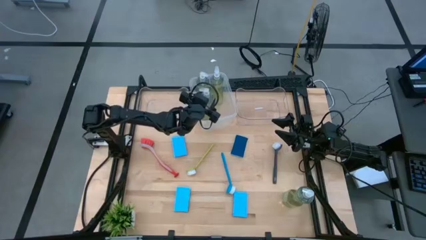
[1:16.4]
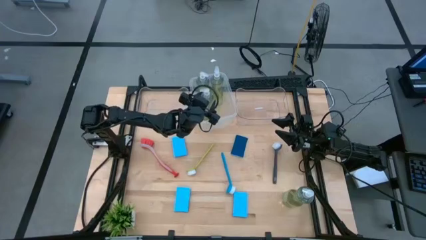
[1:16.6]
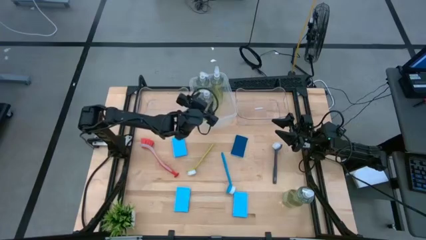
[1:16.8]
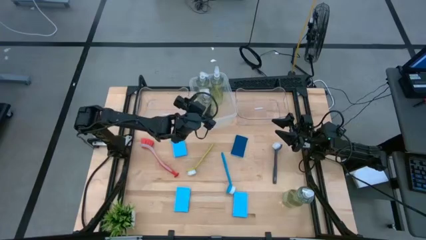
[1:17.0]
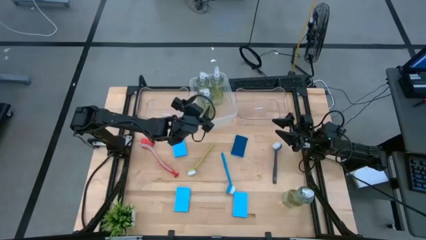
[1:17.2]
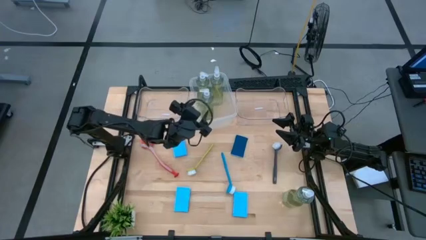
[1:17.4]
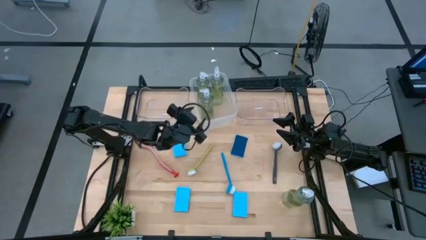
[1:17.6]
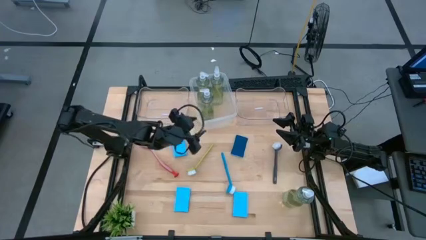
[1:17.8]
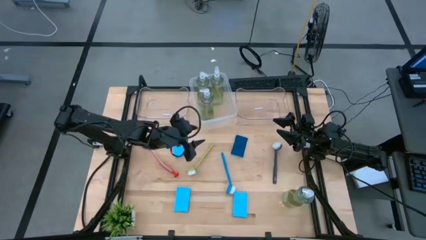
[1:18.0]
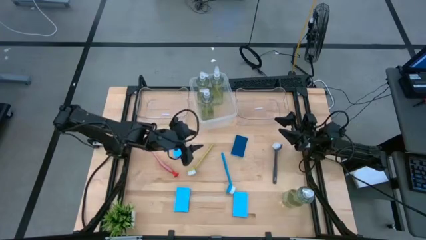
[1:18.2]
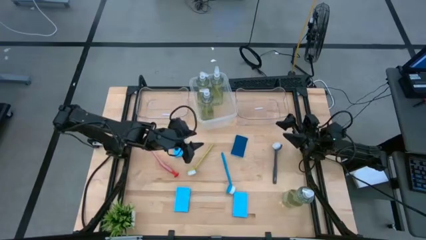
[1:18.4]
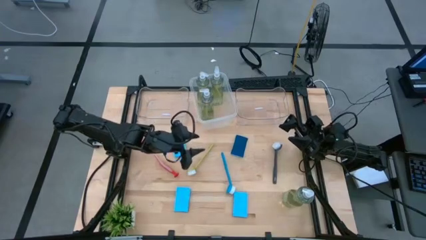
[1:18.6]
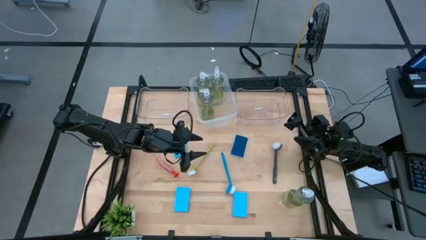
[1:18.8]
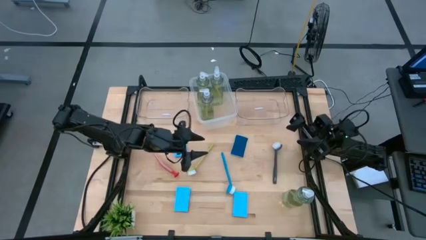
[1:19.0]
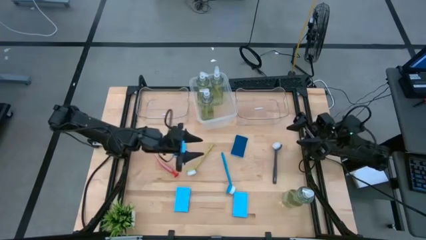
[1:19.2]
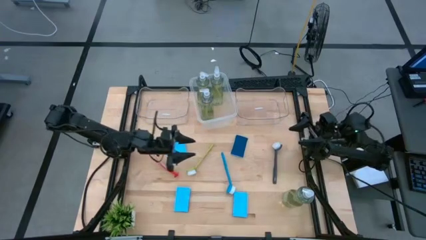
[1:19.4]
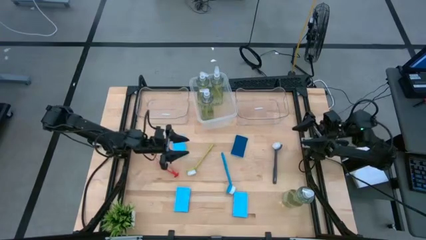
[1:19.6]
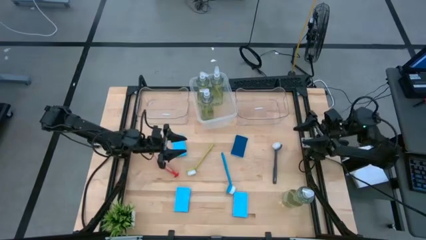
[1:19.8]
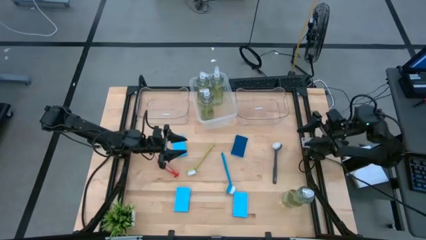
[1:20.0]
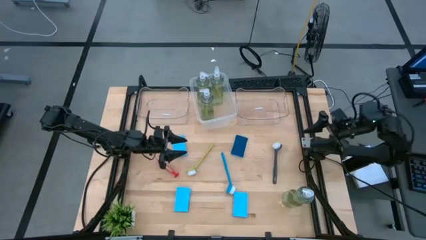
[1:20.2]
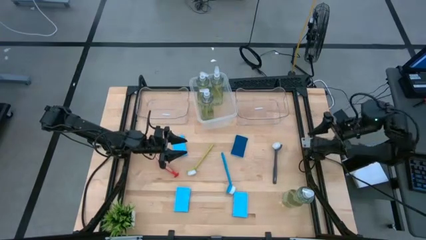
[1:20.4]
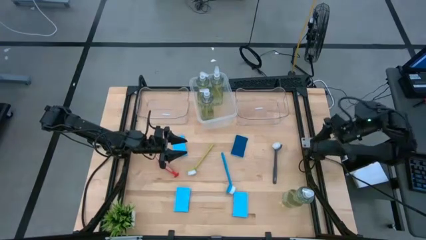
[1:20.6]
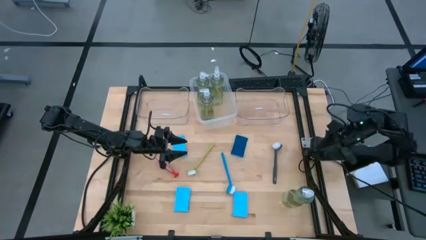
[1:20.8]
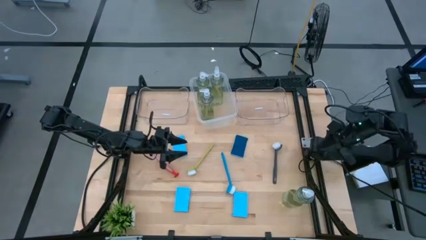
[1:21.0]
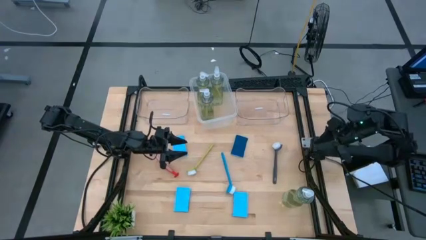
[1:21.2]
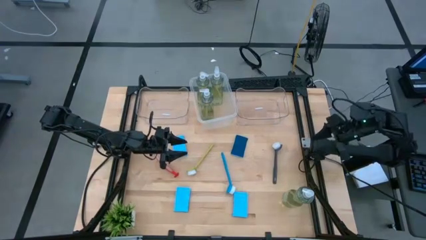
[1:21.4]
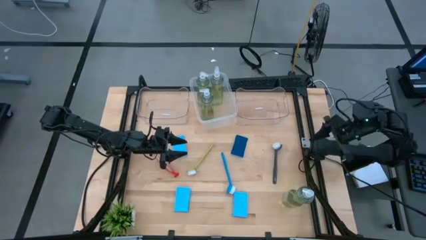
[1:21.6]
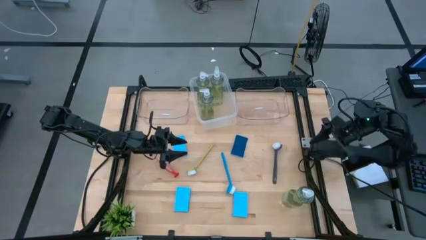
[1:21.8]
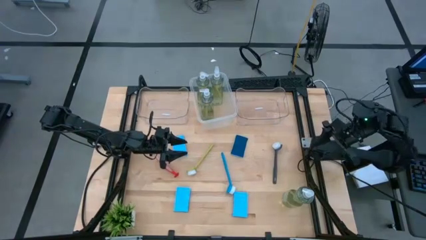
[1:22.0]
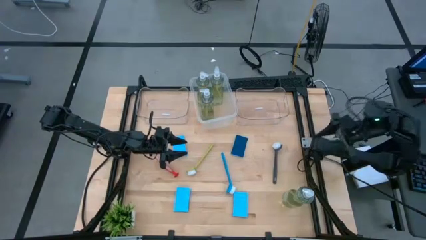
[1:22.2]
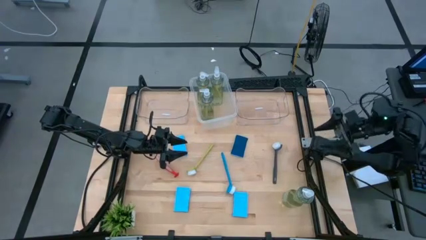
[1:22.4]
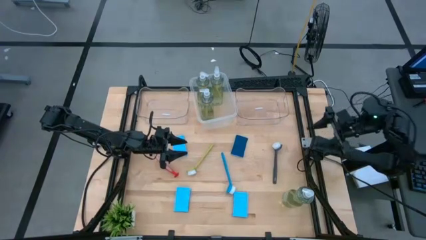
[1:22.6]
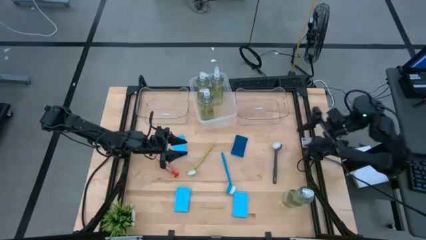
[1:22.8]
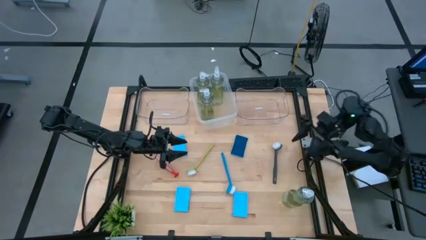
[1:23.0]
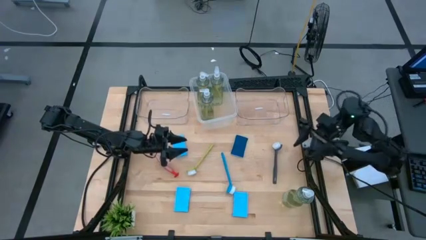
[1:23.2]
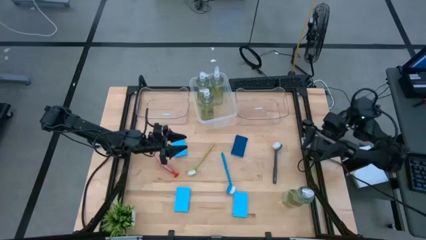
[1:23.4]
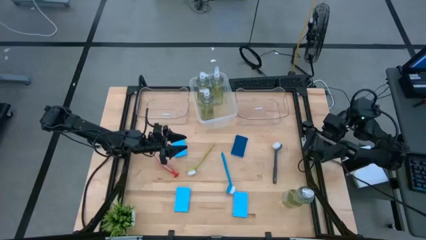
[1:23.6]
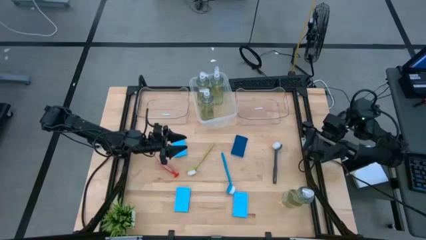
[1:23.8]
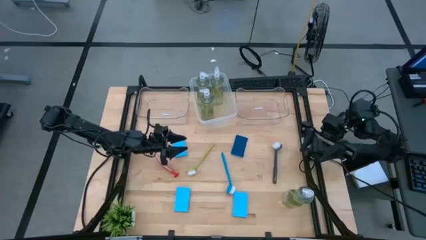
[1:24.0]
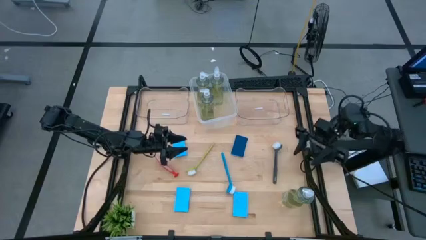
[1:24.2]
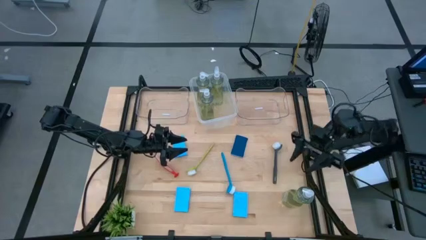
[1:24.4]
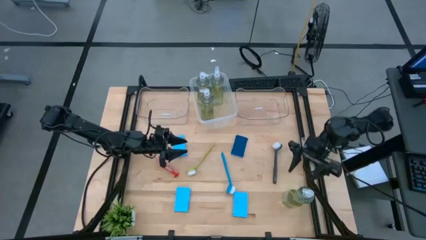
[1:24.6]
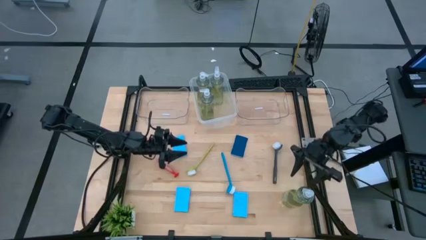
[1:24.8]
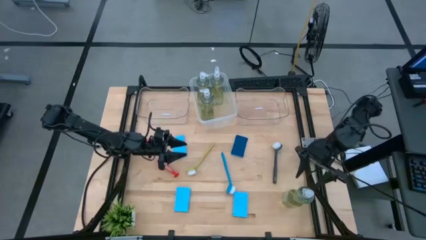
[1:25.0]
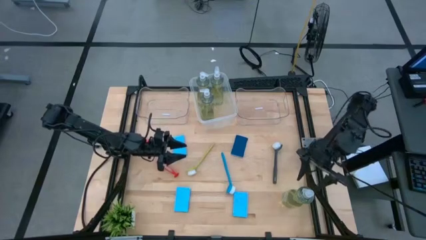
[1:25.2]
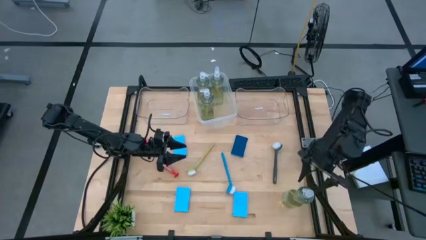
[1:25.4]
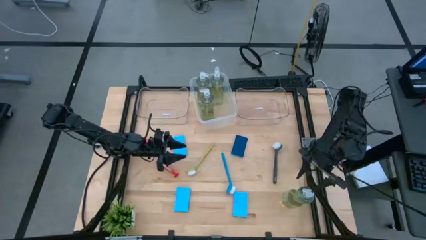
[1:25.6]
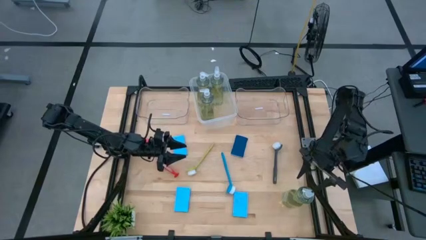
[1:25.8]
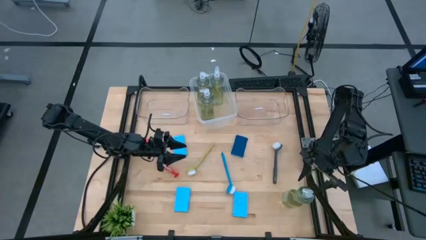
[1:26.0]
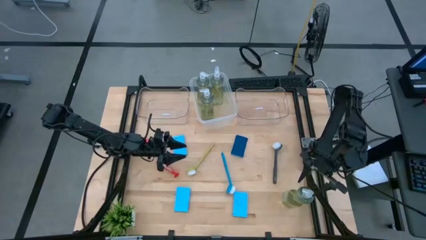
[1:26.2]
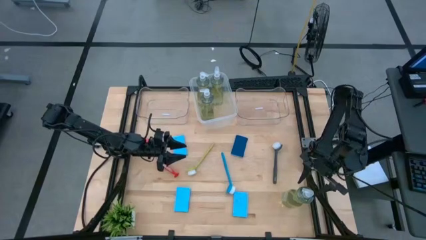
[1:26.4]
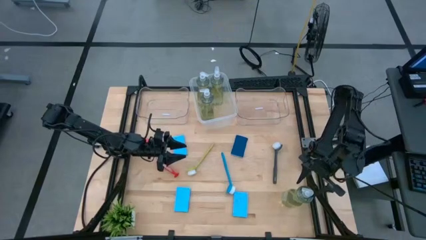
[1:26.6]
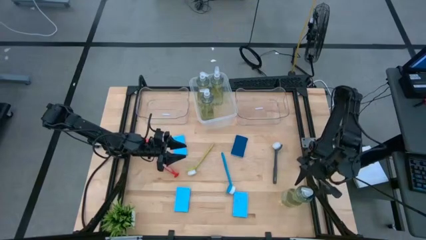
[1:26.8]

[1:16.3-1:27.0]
Task: Pick & Place Kitchen Sink Supplies
Put the green soap dispenser into the transparent white bin

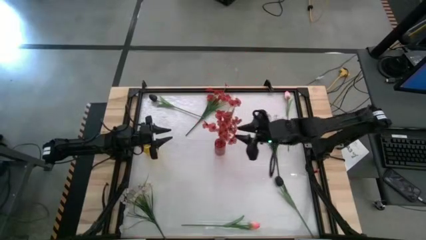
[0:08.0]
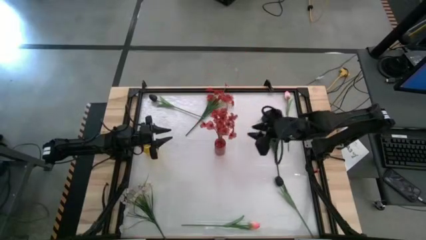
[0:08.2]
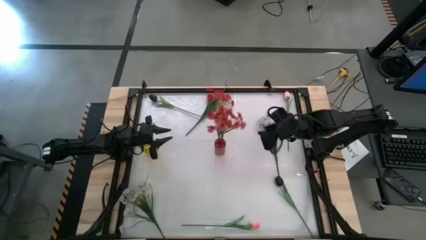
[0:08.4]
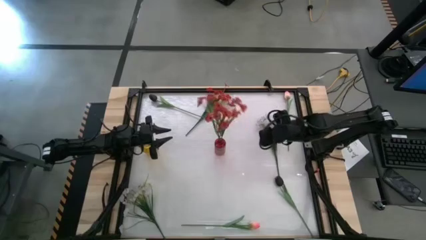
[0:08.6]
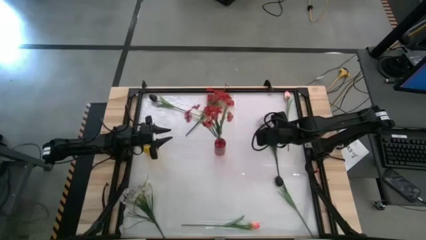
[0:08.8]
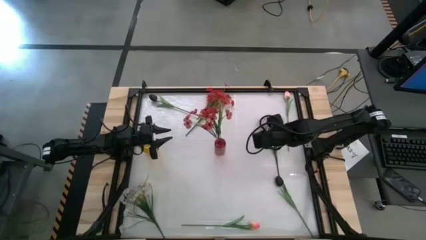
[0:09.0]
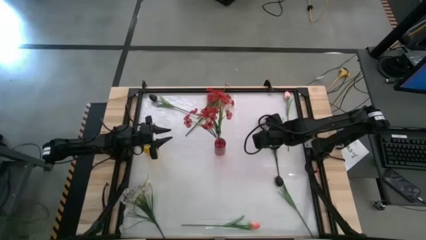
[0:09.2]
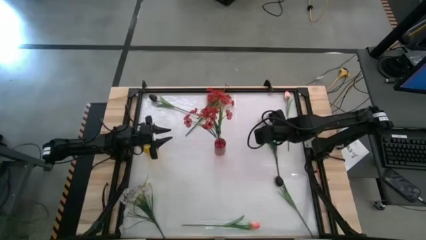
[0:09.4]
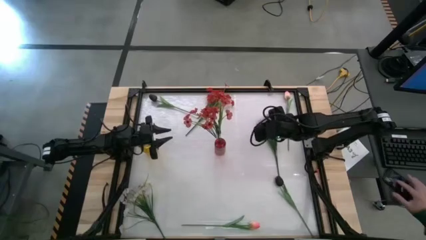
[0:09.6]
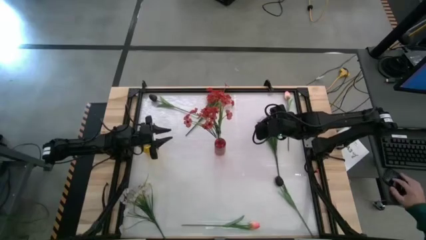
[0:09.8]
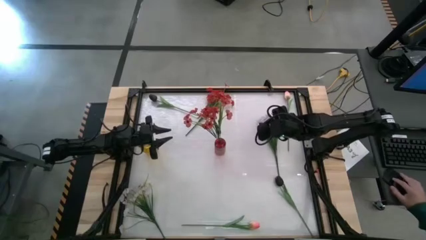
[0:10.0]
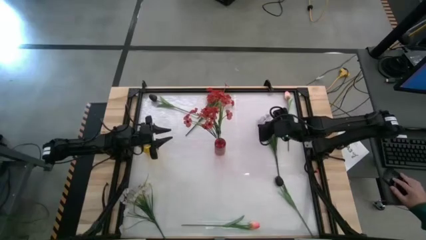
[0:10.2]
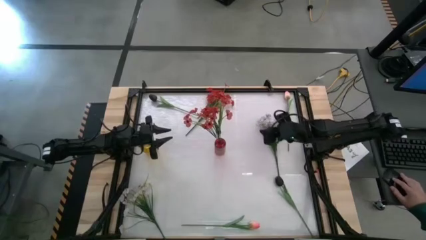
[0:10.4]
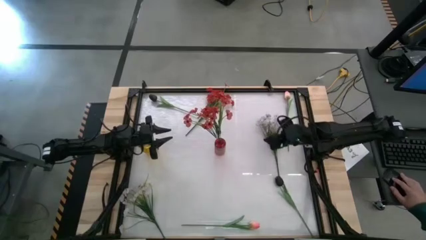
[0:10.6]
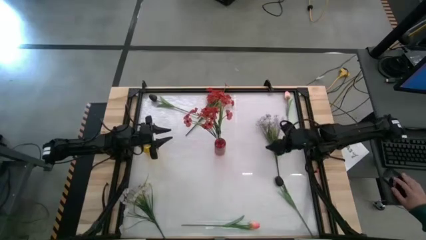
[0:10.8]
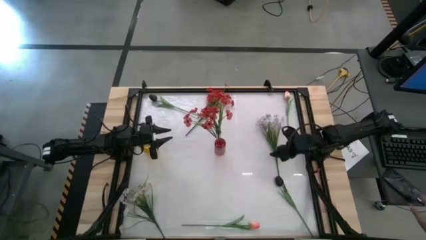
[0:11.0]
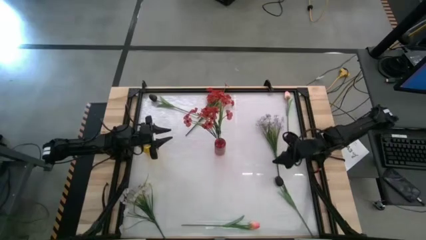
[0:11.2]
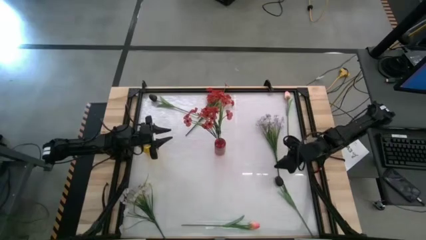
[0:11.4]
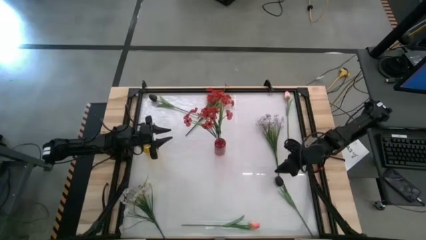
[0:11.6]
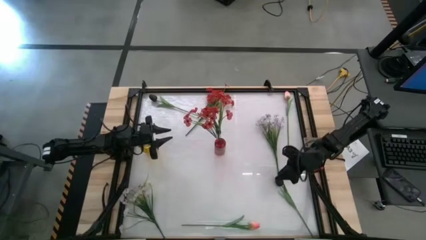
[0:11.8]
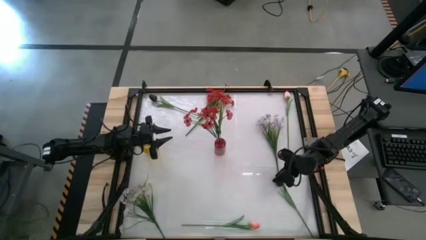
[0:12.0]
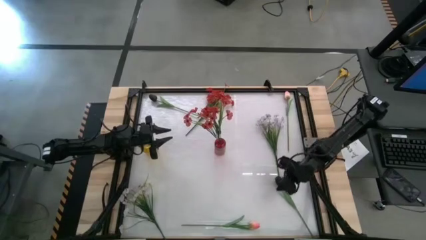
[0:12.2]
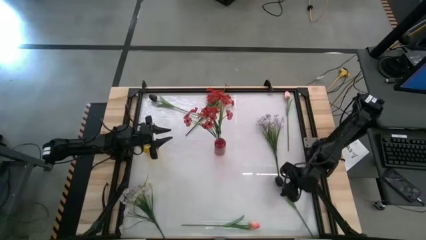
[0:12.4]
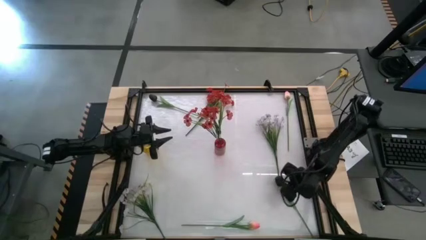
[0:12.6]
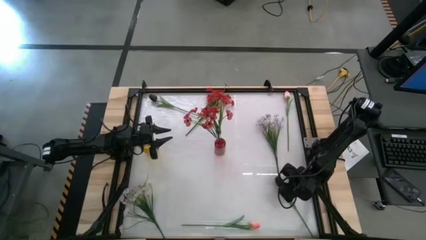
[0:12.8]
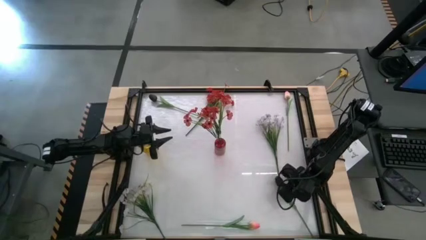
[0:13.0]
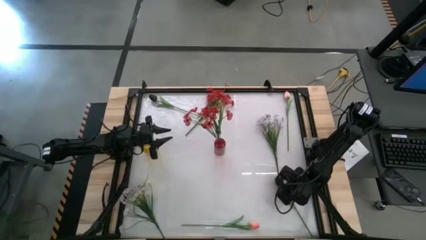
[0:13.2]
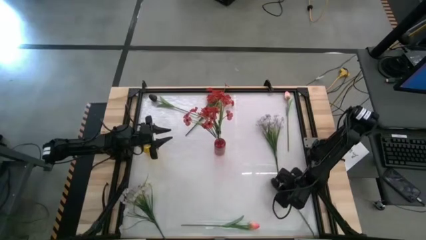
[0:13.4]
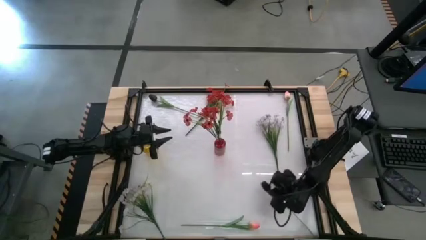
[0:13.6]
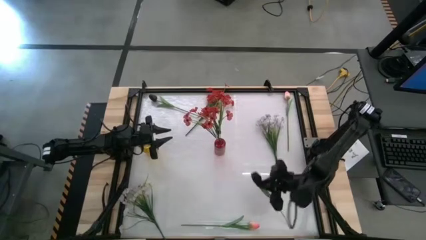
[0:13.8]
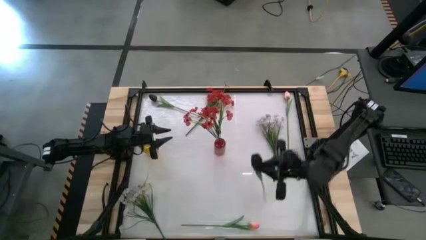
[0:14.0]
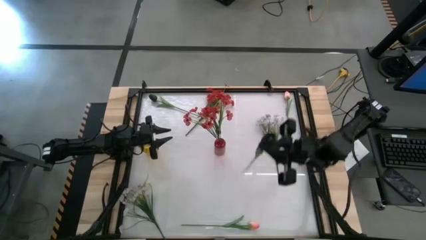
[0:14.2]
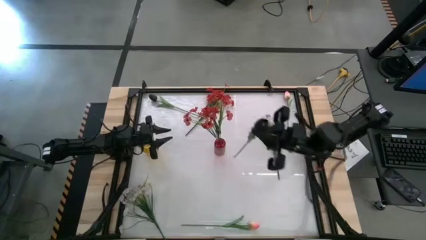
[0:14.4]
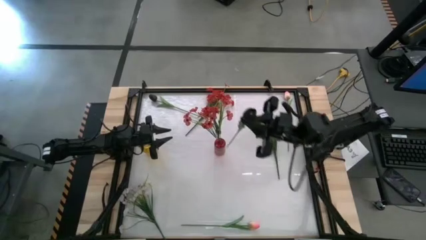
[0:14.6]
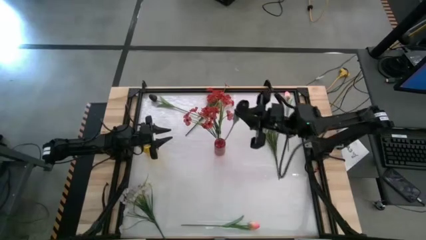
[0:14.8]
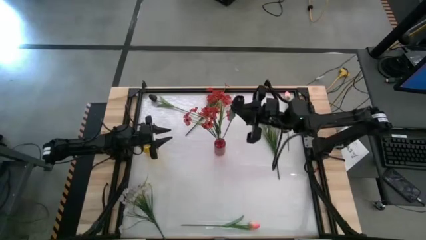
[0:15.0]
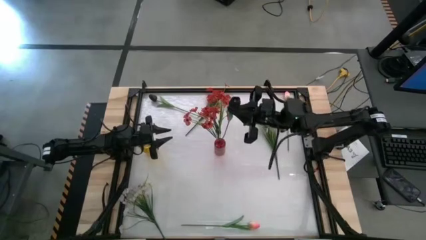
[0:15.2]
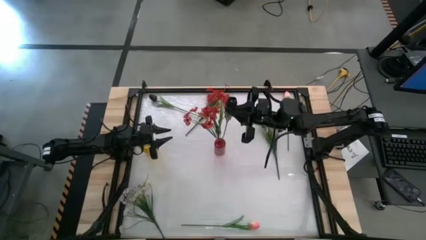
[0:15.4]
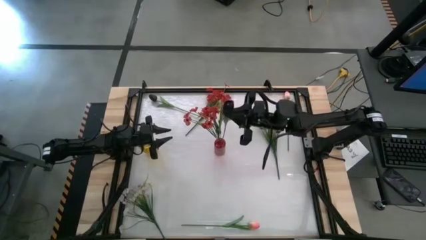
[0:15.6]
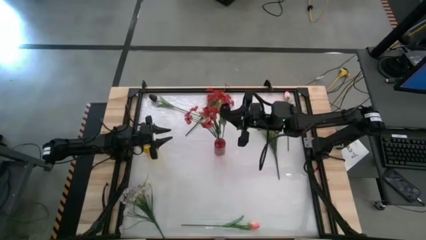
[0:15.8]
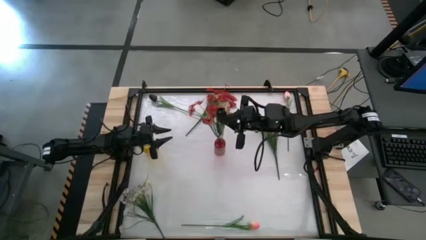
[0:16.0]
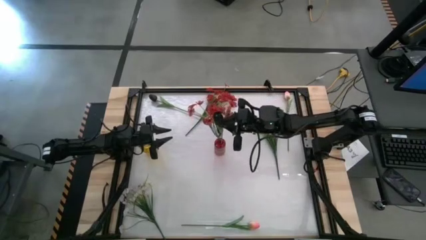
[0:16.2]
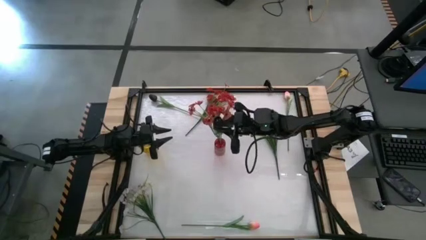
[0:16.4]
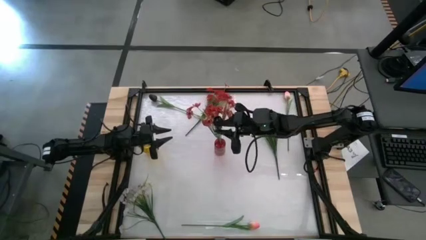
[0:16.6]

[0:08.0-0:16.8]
Task: Sort flowers into vase by color
Put the right black flower into the red vase
